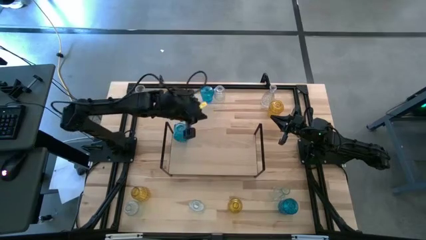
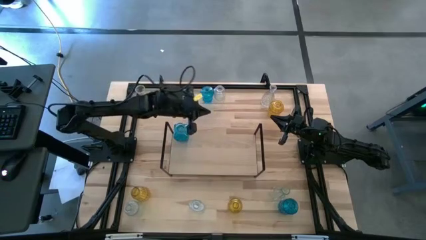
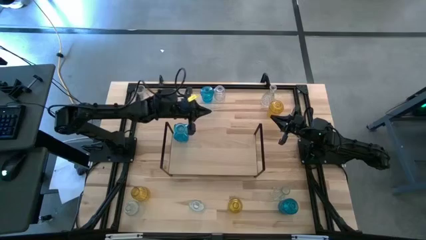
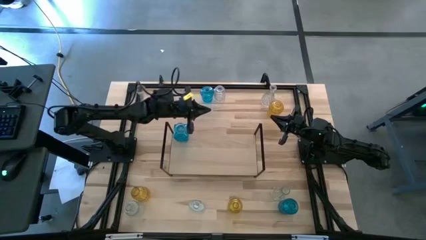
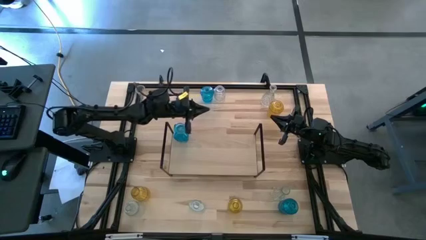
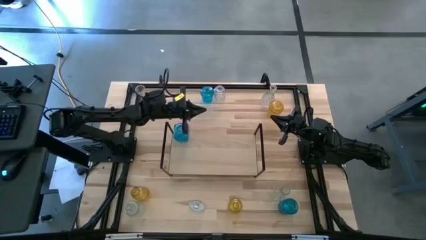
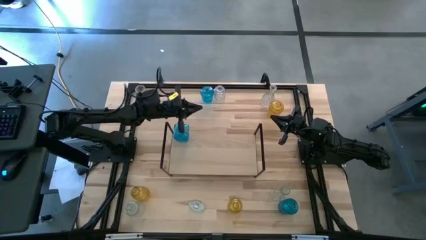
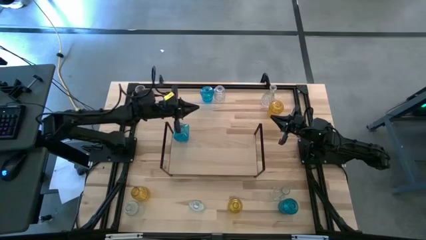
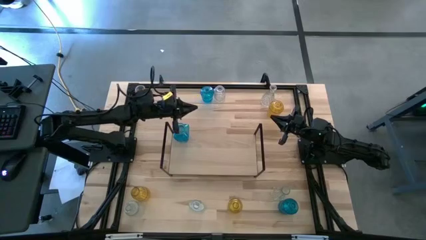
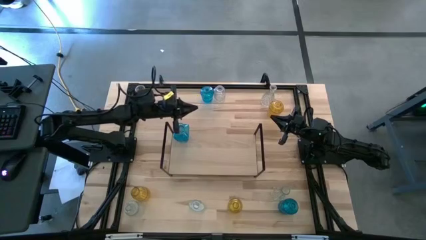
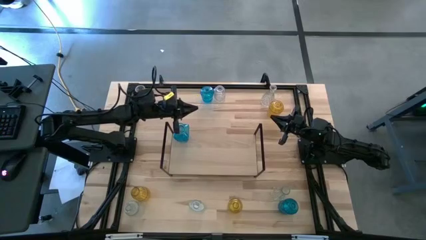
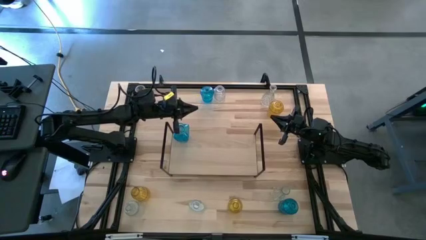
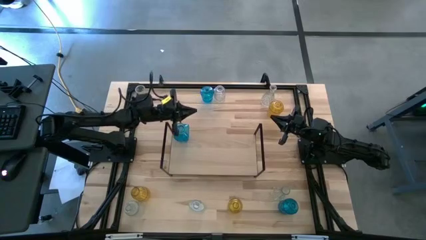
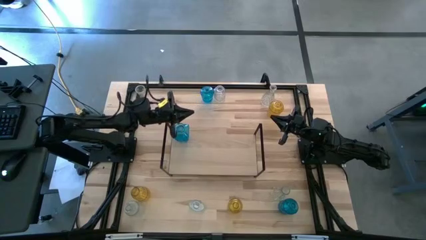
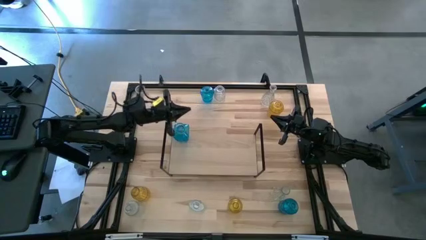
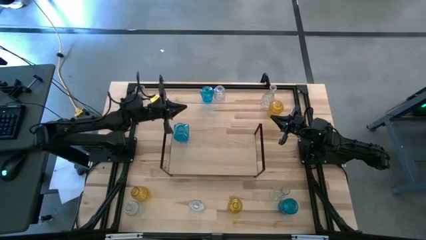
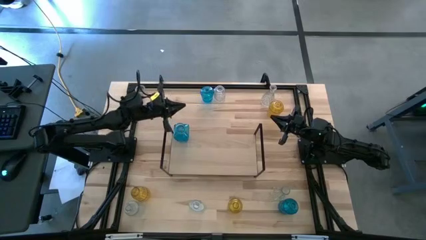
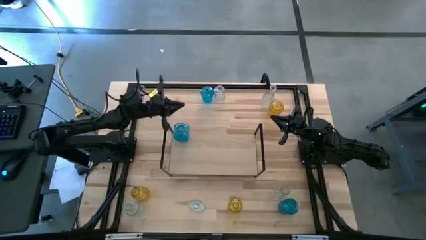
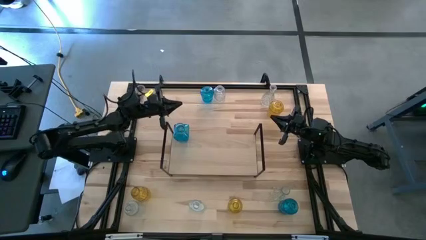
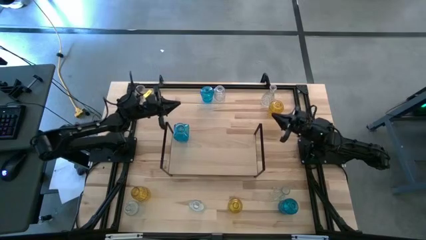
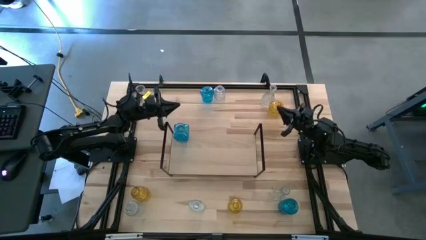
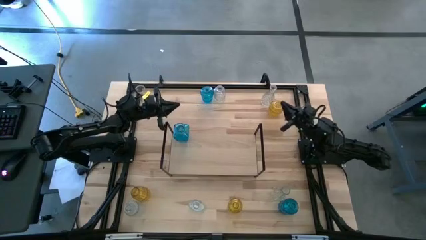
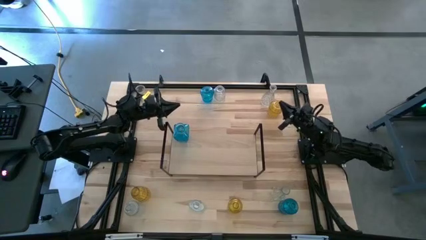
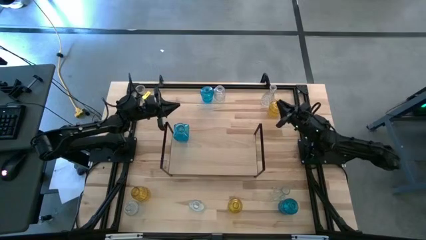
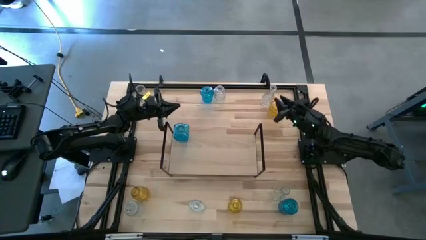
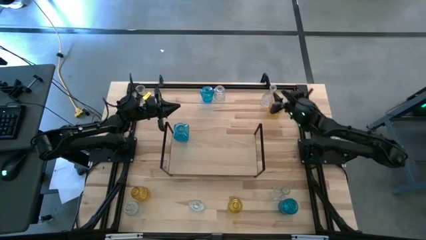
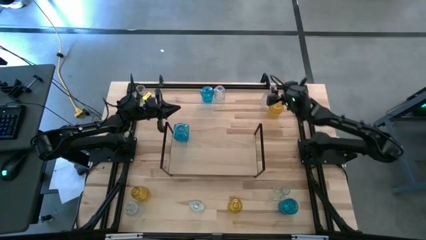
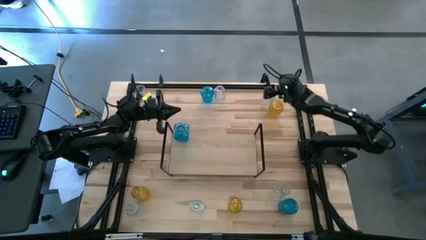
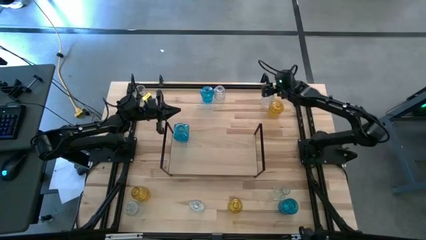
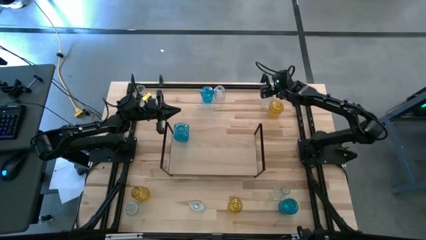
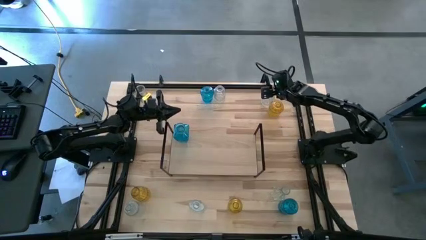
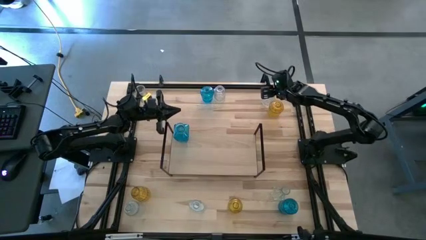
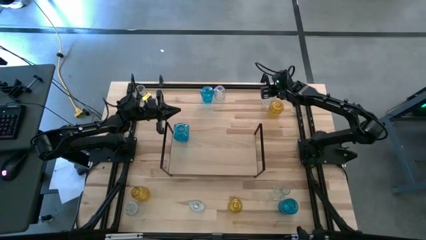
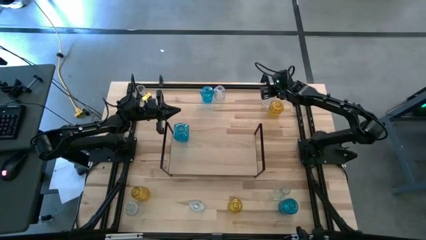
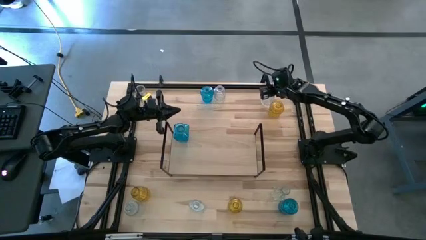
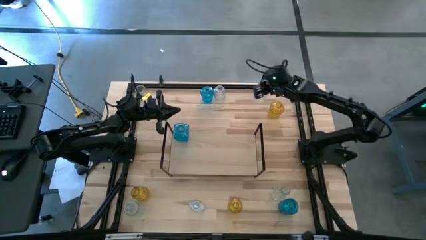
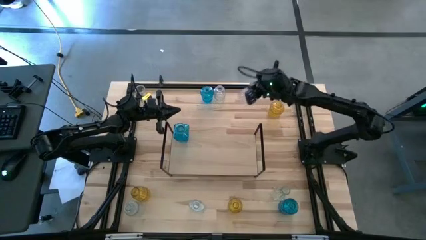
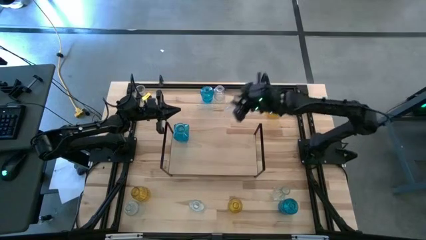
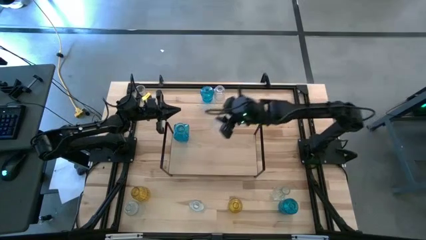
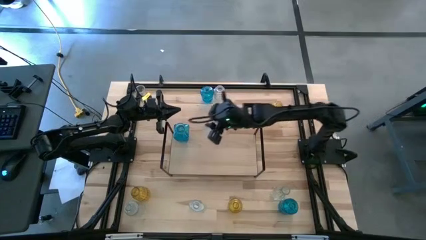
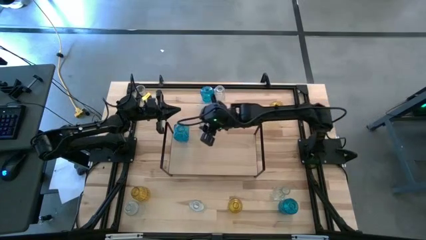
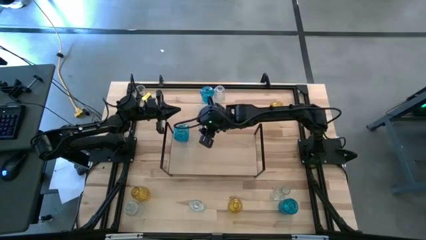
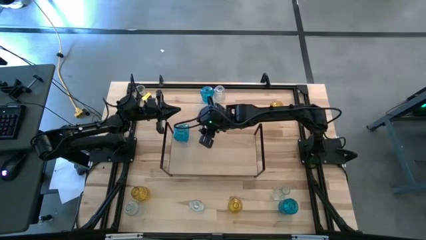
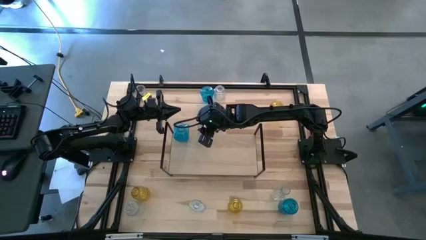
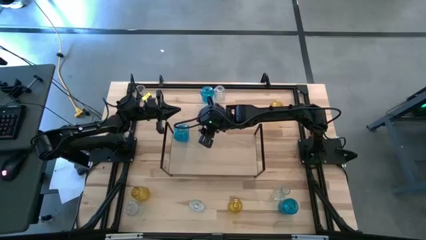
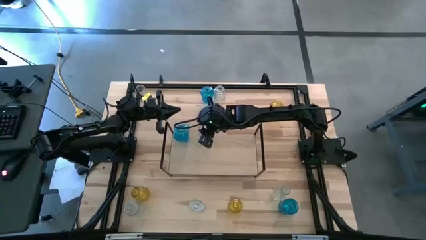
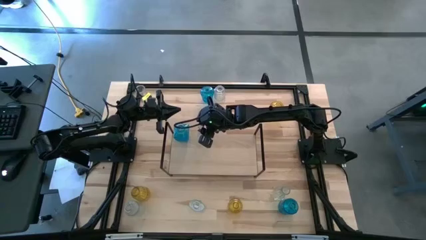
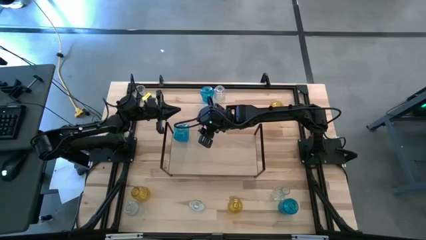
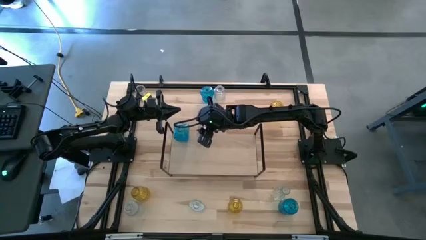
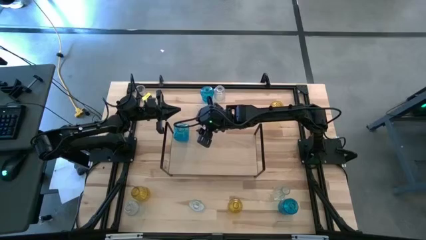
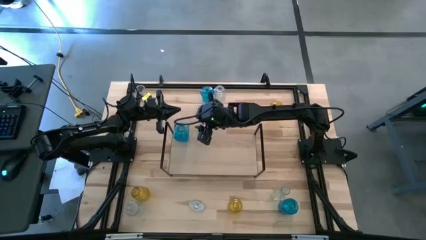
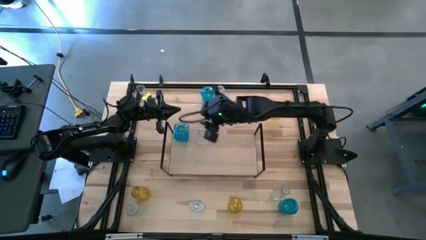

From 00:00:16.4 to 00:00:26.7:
Task: sort vases onto shelf
Put the top right transparent vase on the shelf

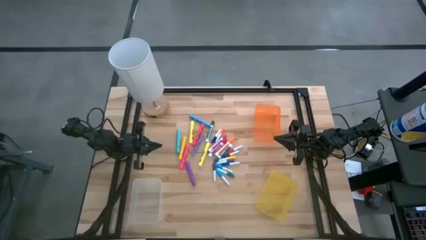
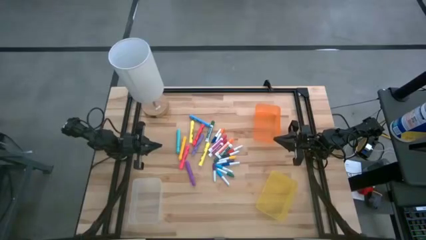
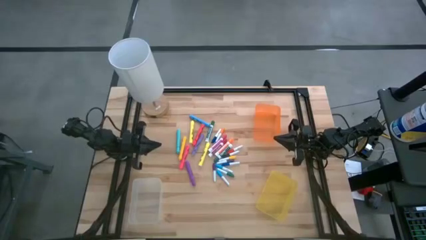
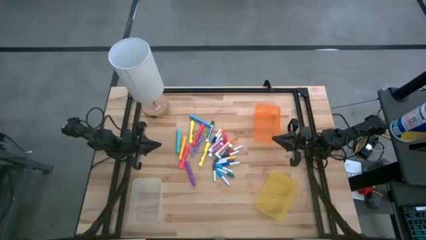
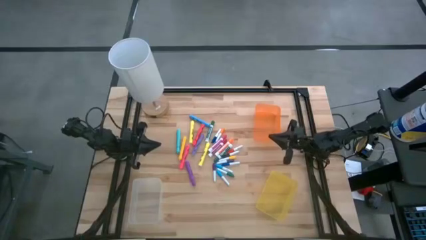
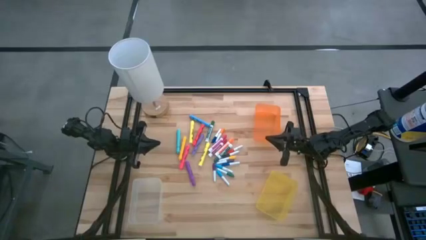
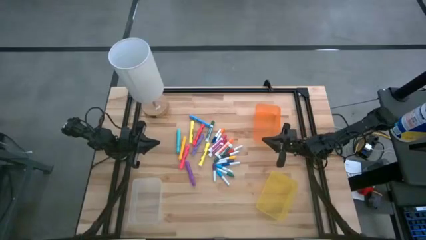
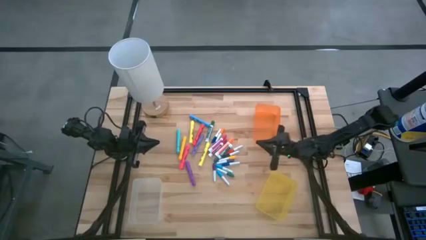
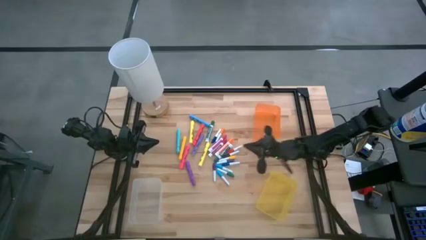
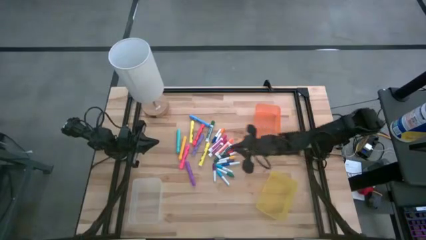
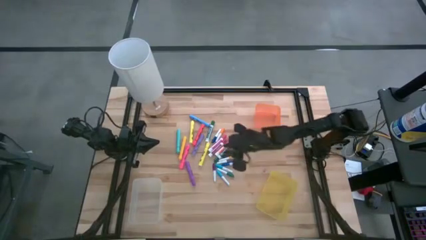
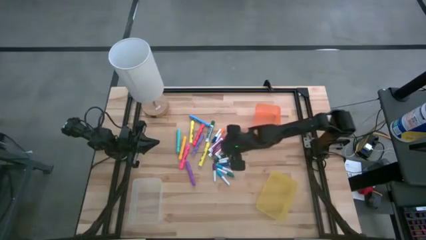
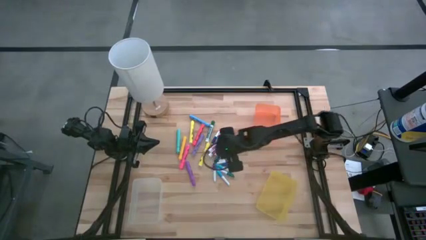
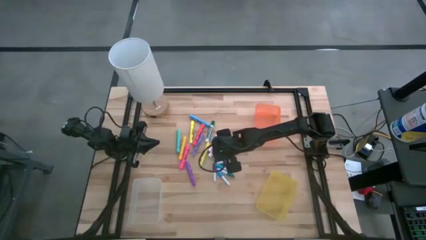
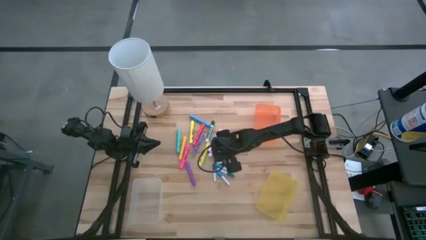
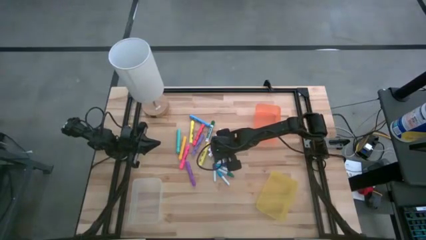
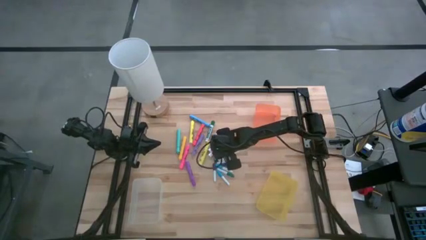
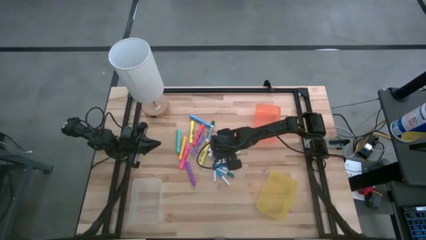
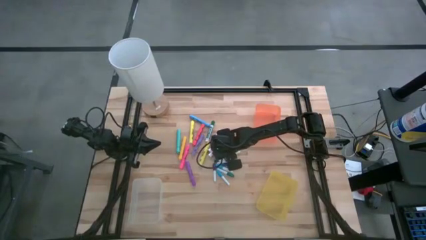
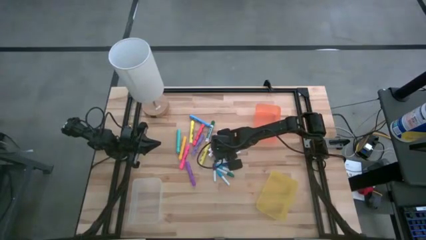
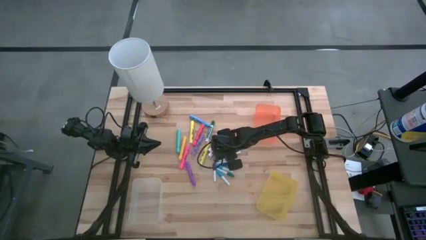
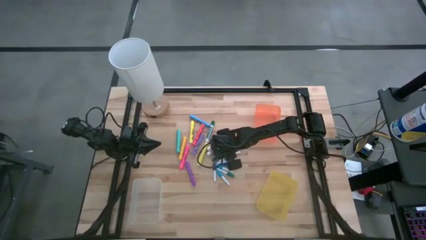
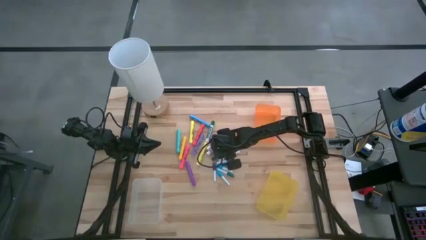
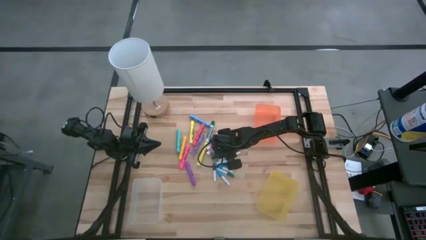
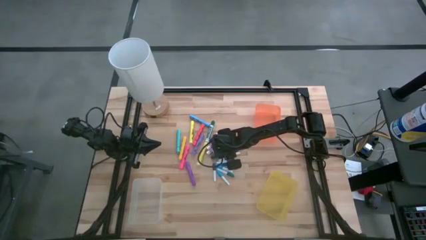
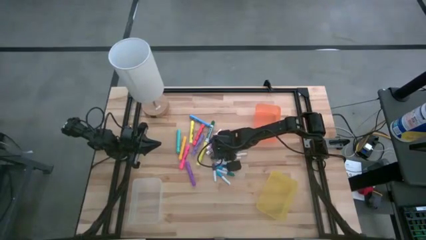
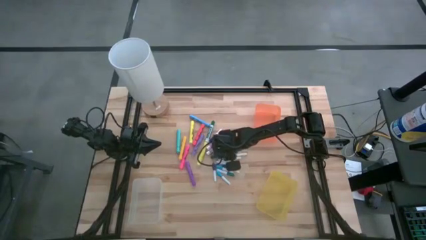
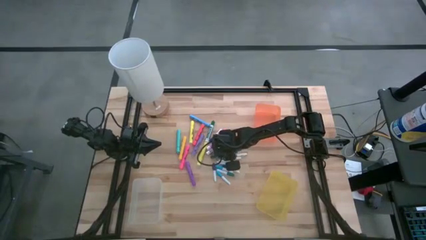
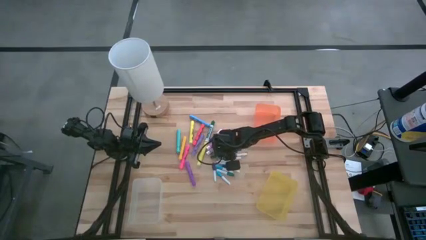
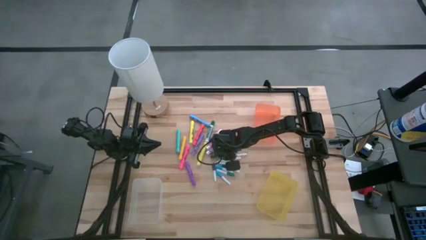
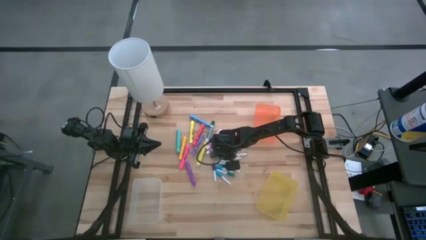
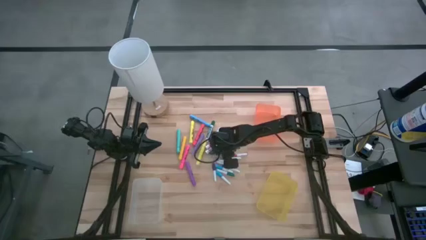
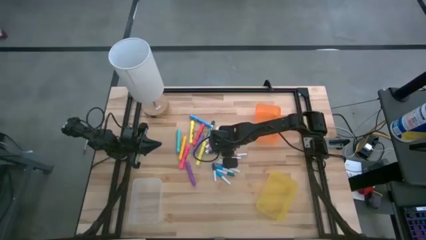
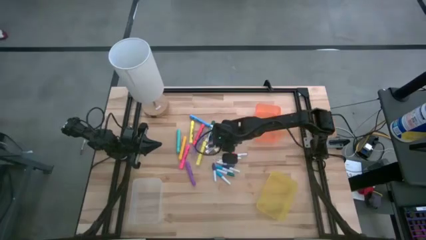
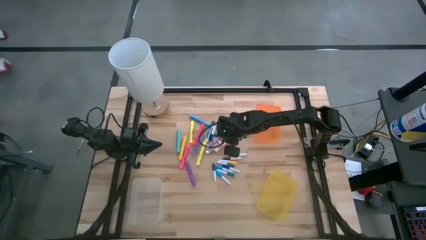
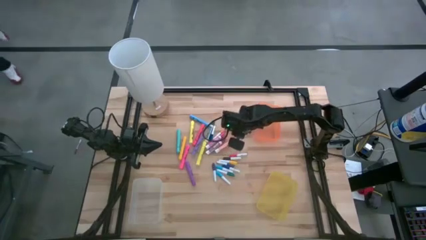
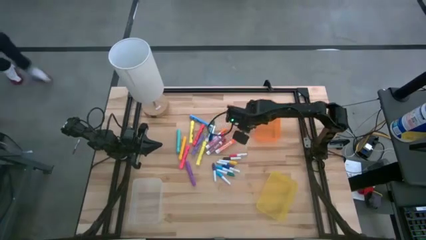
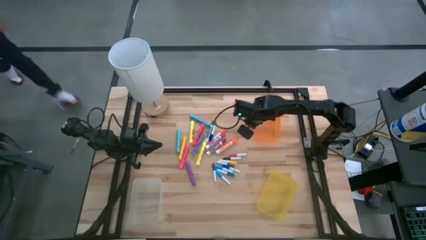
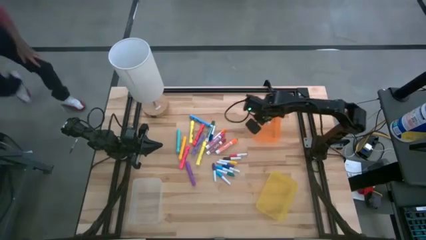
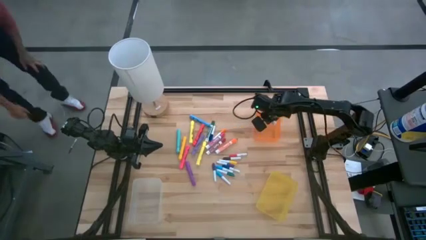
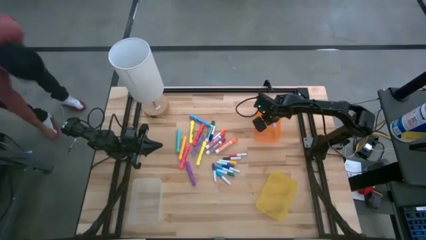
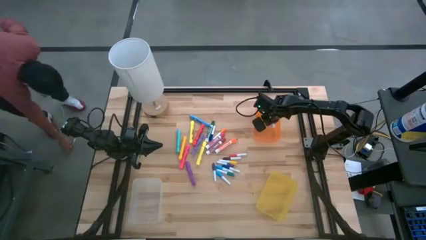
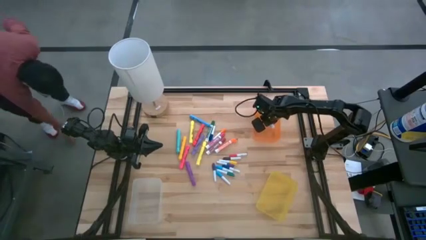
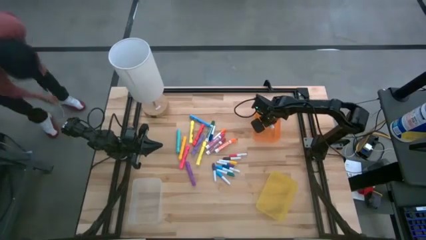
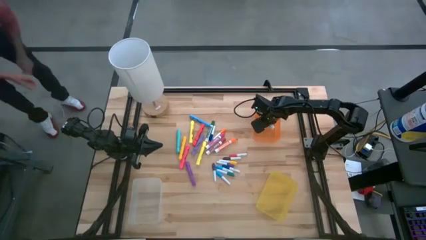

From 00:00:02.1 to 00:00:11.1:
Task: Pick & Place Markers
Put the green eraser marker into the orange bin
